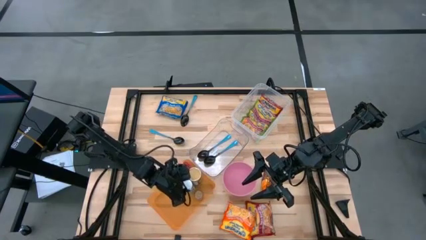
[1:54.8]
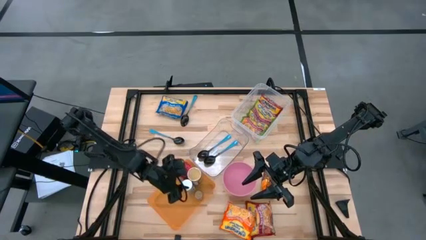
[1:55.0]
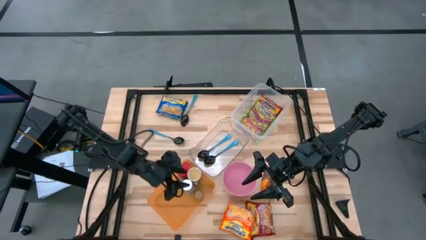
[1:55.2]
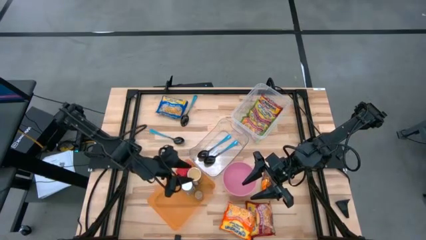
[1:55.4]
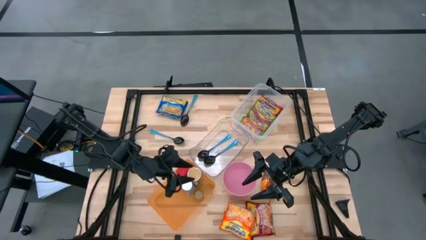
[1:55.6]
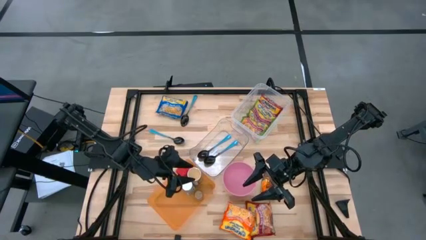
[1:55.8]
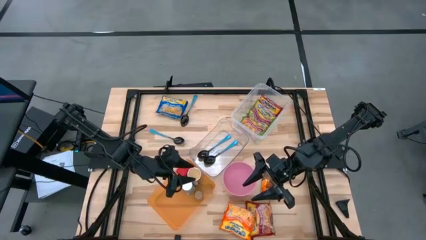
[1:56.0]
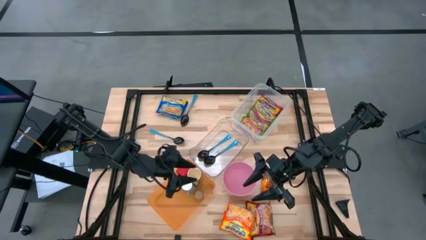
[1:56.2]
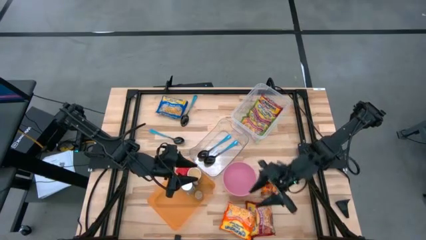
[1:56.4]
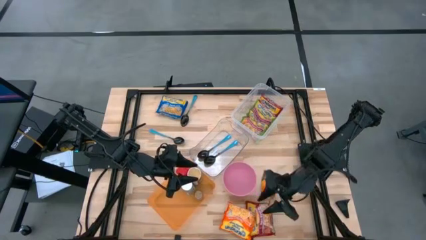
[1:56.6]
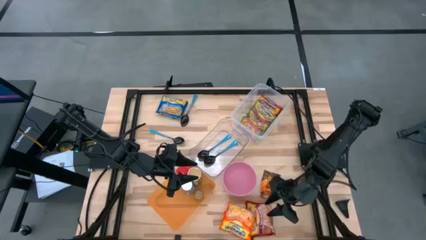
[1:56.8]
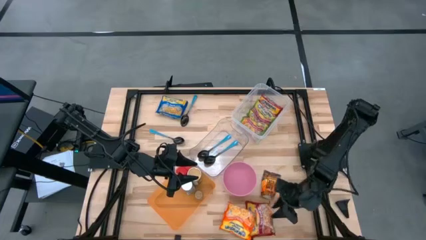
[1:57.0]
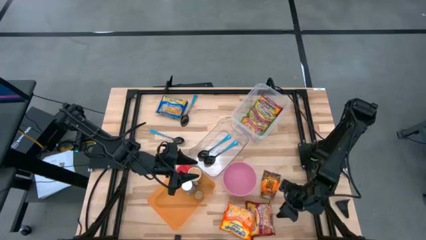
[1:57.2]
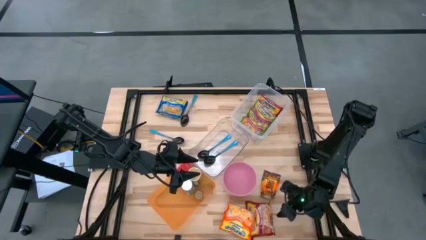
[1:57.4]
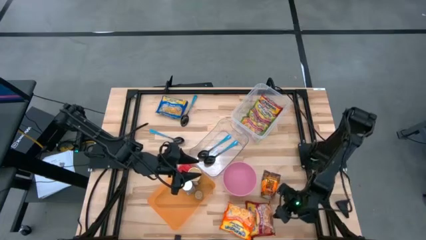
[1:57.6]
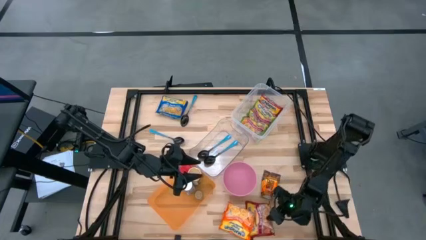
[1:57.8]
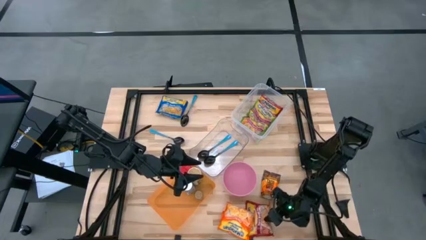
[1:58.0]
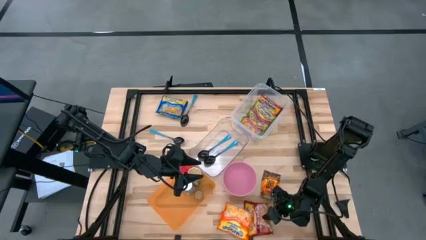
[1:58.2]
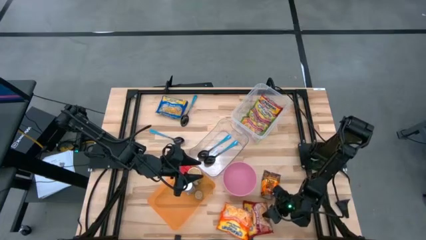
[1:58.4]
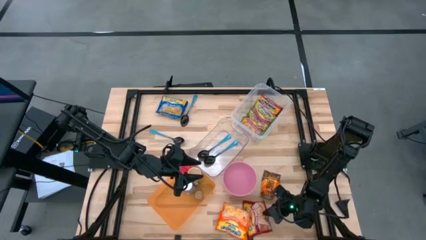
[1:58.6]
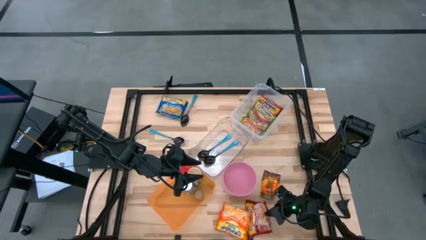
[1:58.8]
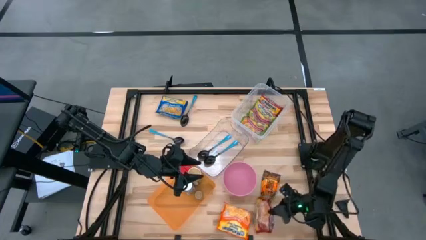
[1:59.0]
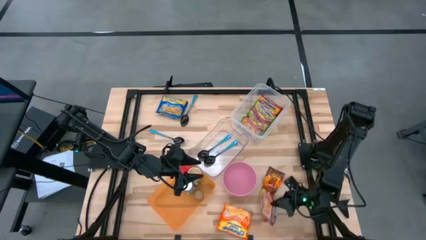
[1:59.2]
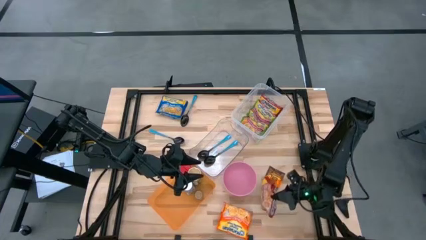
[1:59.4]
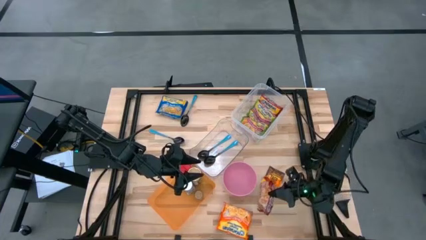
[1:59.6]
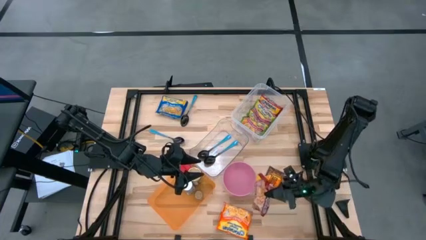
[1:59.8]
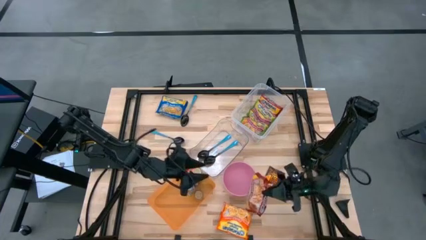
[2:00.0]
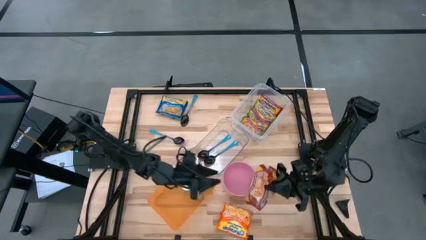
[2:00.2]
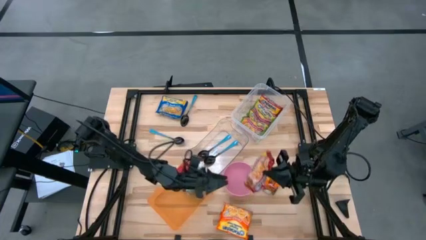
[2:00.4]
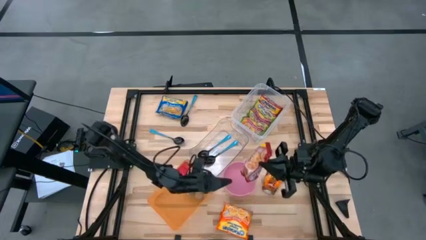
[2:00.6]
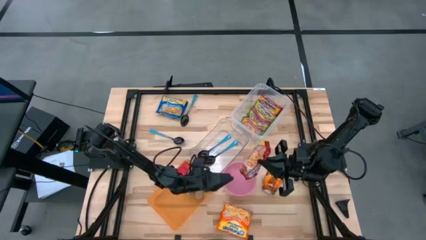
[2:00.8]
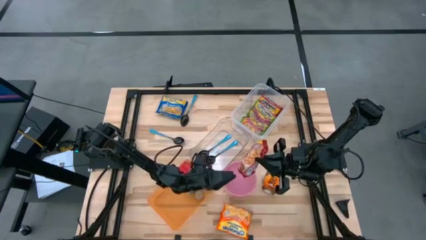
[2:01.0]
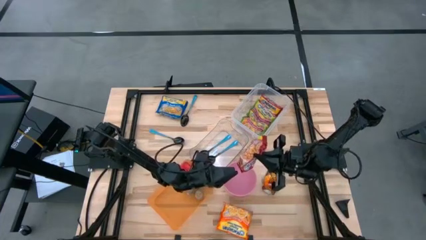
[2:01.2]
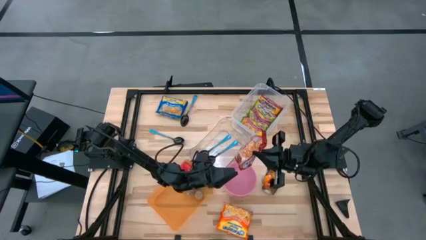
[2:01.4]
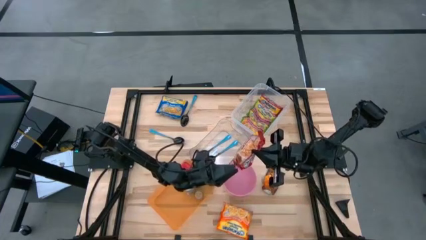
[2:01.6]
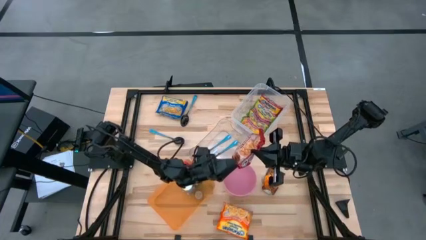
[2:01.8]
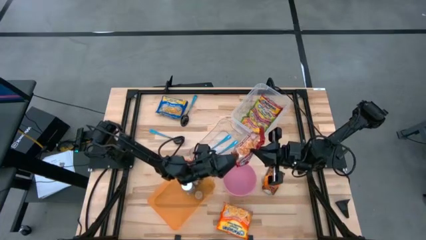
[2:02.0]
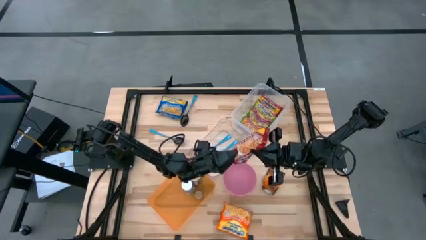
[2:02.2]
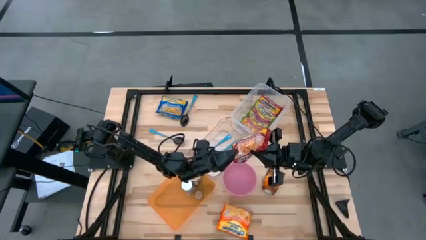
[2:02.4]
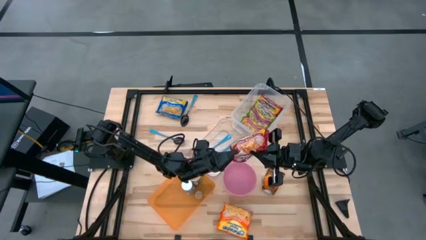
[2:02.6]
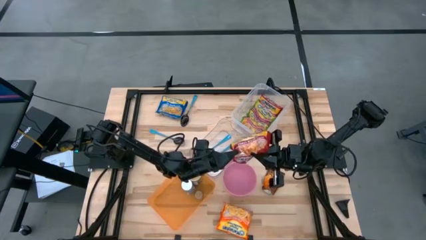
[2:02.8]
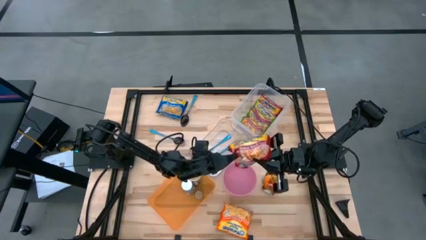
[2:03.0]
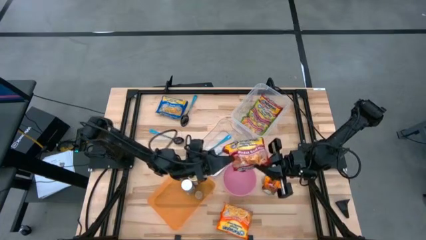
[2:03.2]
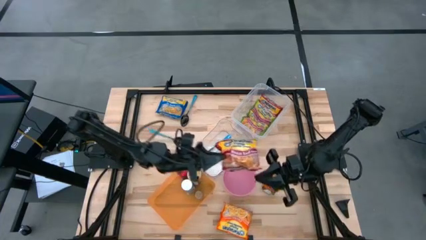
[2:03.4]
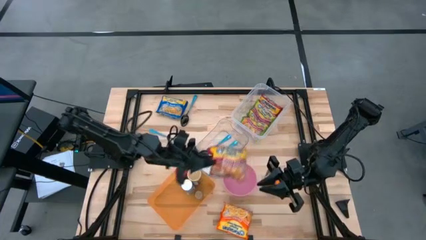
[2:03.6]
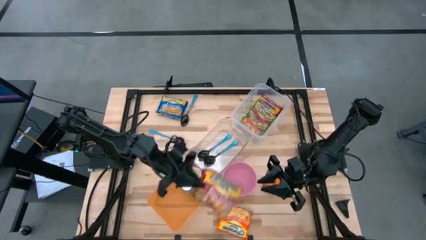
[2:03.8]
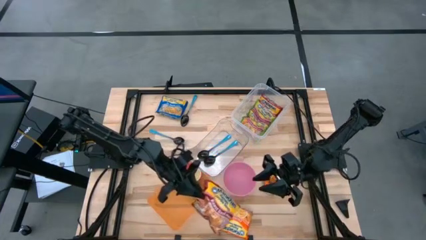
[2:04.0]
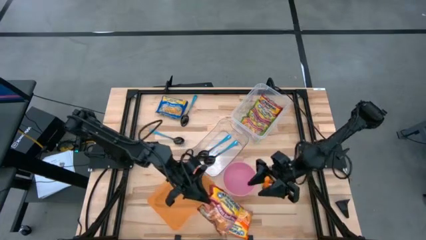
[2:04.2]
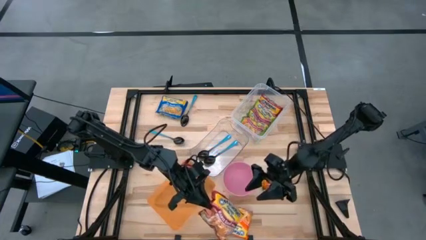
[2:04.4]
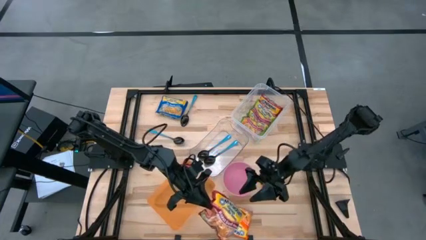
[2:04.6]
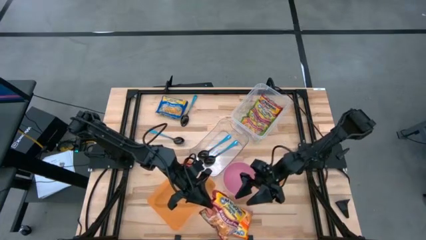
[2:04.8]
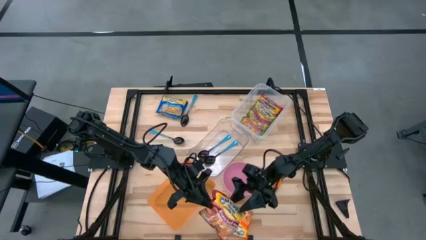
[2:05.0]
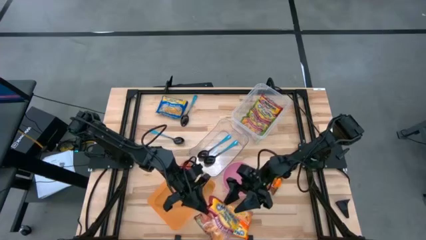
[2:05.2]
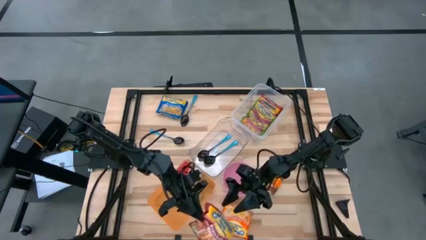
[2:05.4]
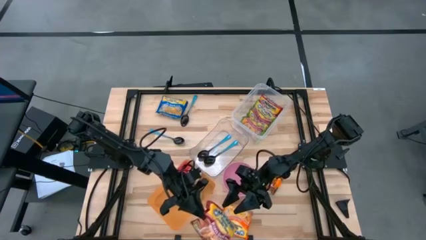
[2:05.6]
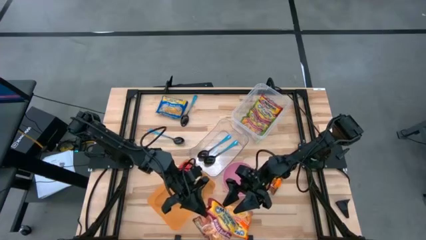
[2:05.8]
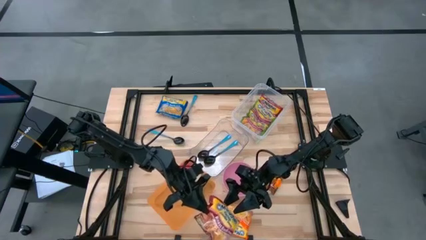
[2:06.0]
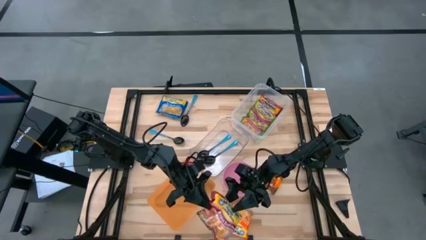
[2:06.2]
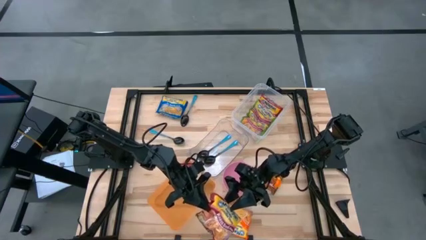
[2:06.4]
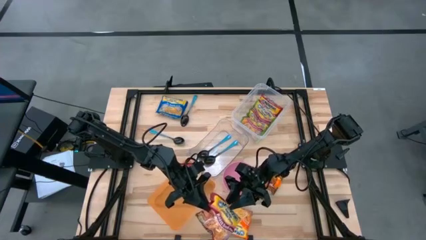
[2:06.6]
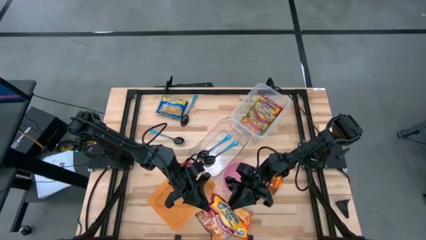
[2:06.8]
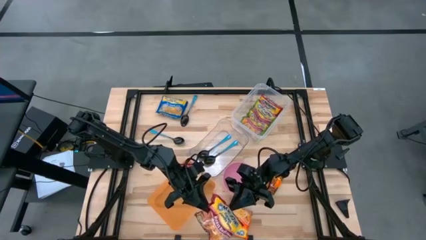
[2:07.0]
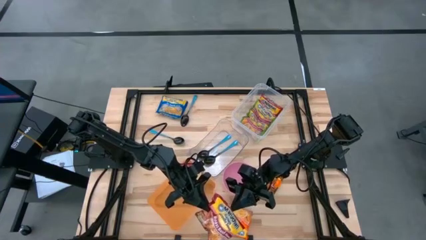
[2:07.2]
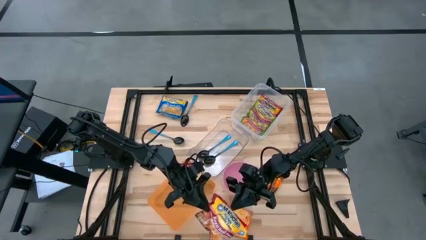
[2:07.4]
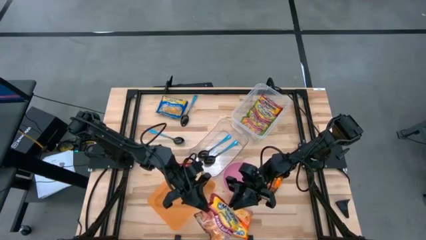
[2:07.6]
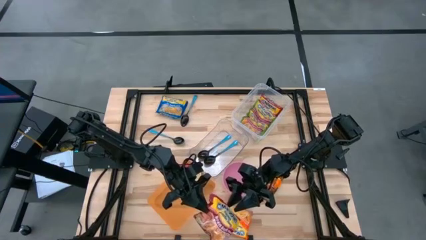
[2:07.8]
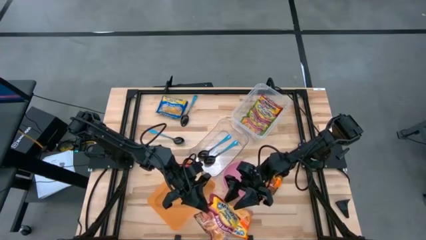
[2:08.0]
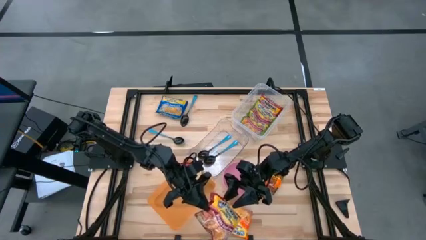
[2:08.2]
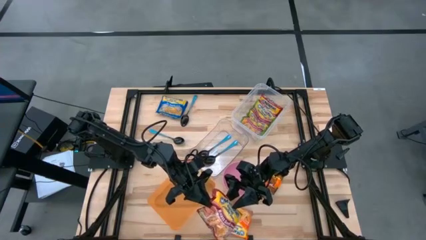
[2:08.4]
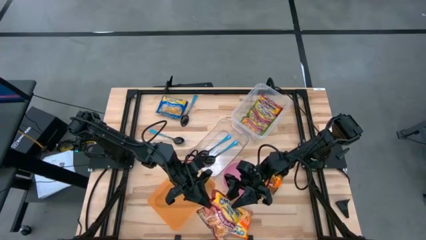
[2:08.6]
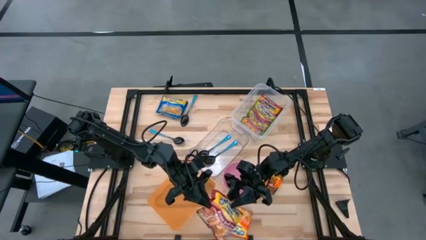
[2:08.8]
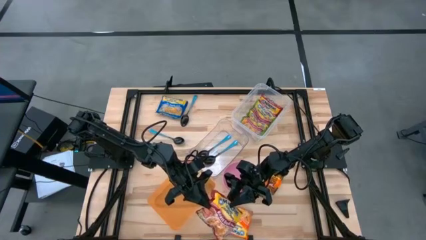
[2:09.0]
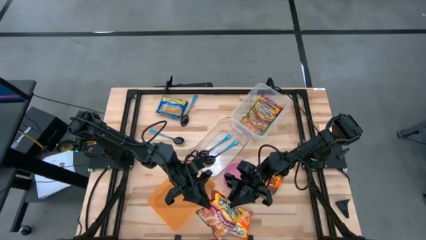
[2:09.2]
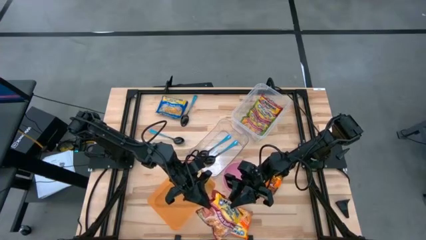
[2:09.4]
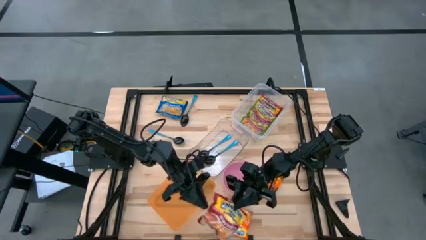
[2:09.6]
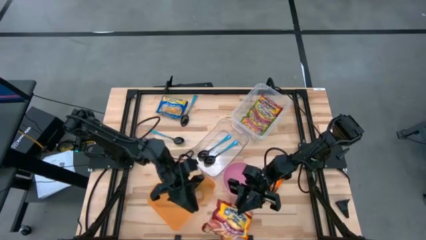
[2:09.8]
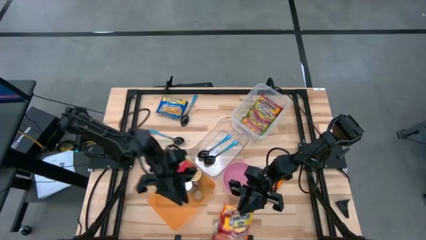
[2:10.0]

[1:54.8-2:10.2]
Task: Pick & Place Food Item
Put the red noodle pack into the transparent container
